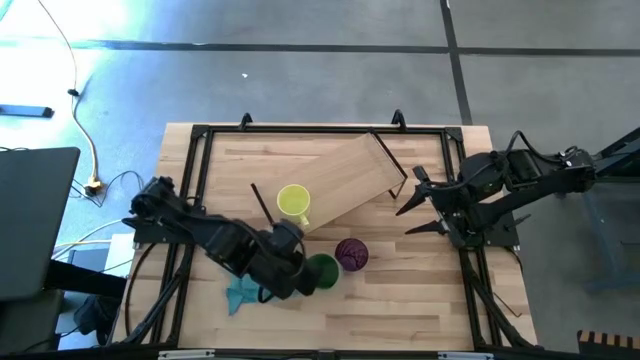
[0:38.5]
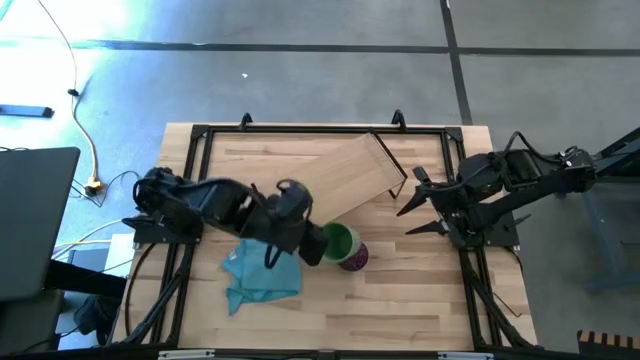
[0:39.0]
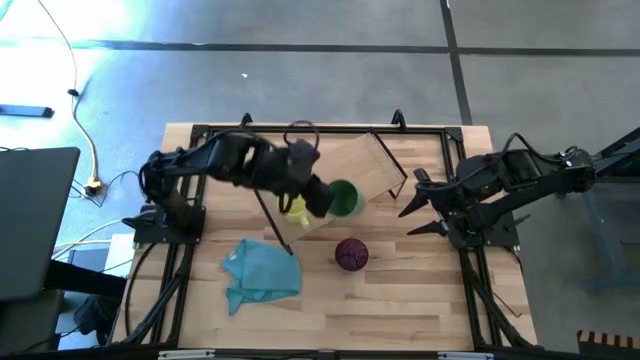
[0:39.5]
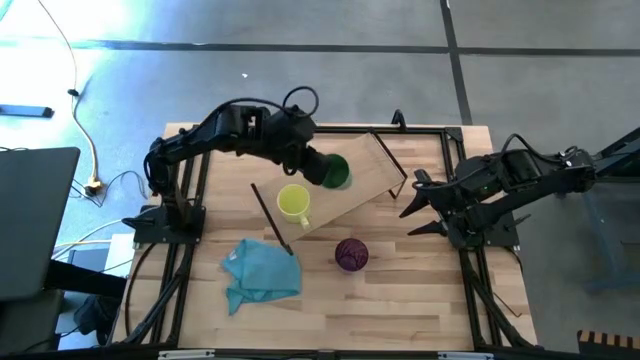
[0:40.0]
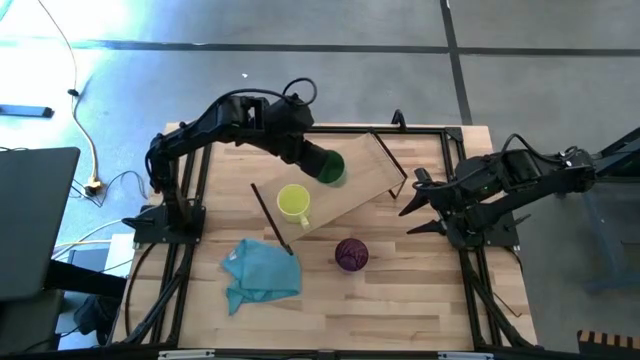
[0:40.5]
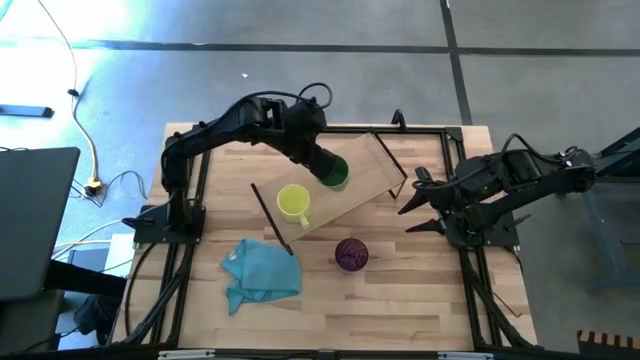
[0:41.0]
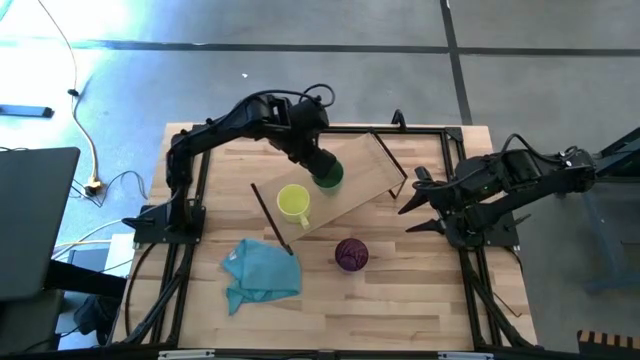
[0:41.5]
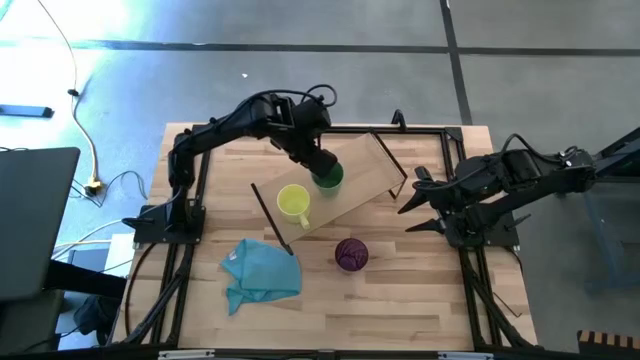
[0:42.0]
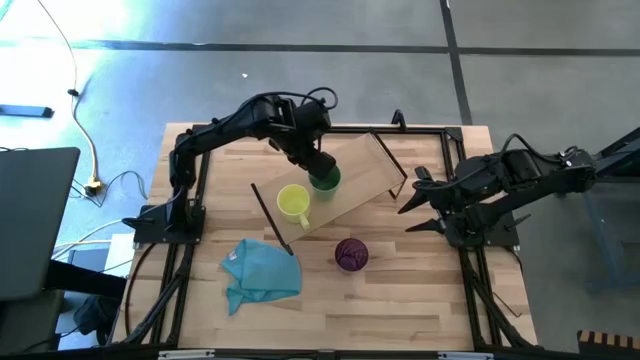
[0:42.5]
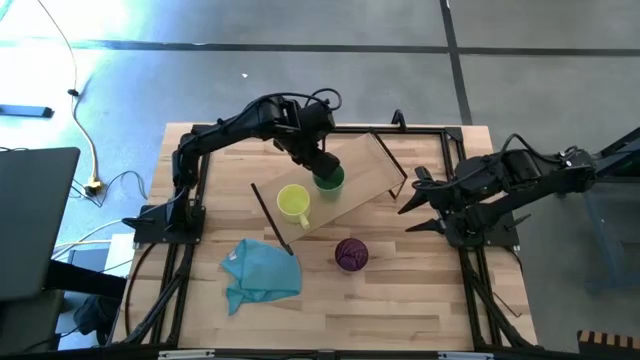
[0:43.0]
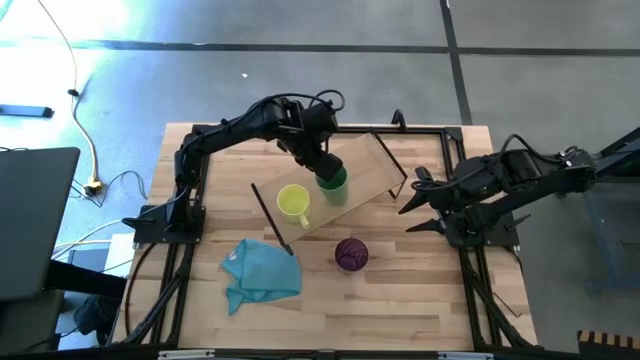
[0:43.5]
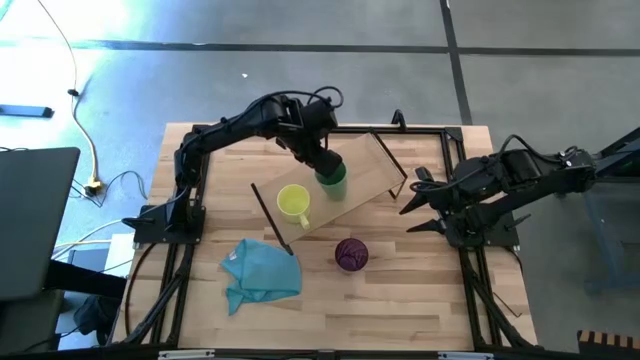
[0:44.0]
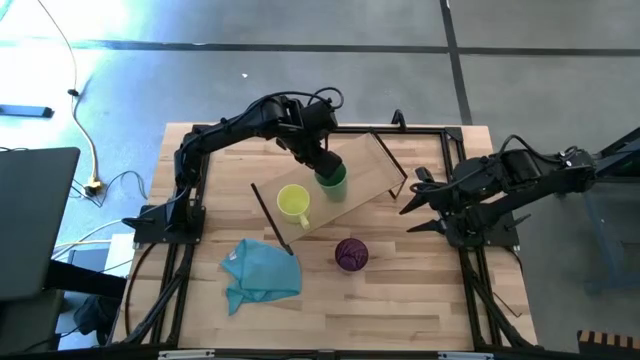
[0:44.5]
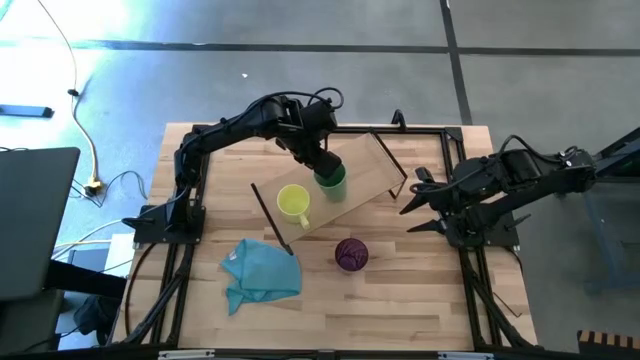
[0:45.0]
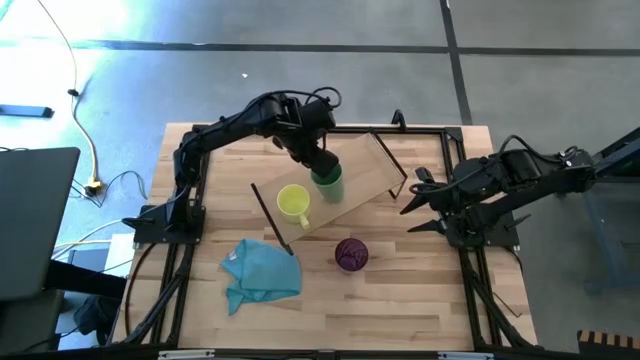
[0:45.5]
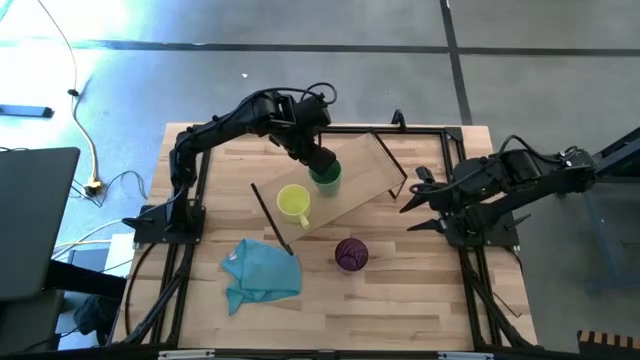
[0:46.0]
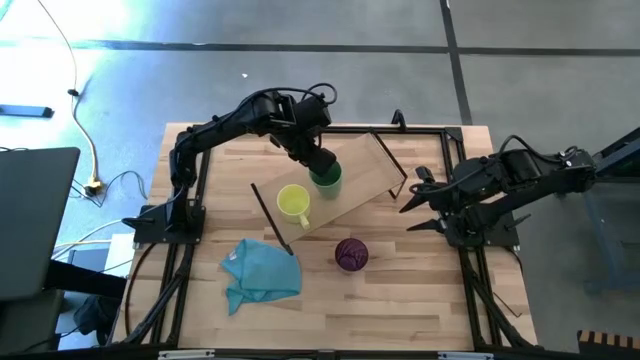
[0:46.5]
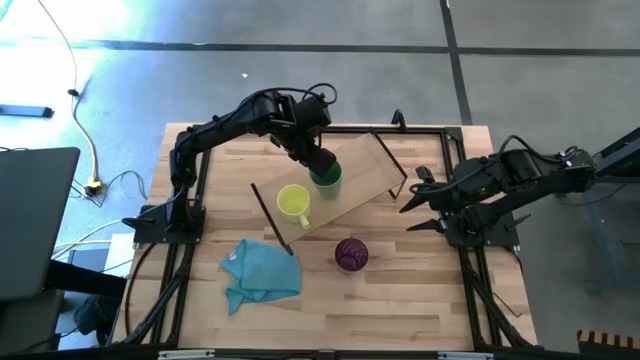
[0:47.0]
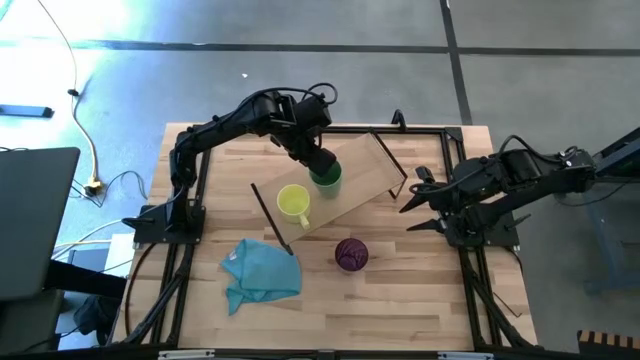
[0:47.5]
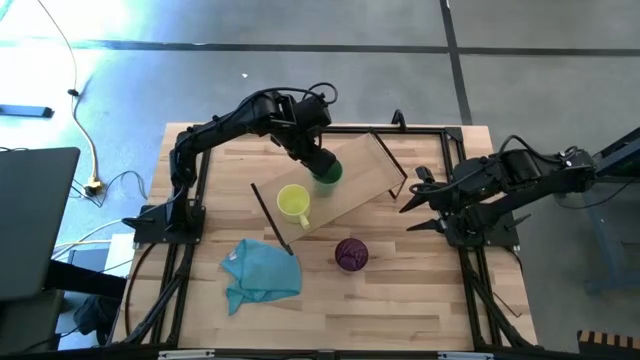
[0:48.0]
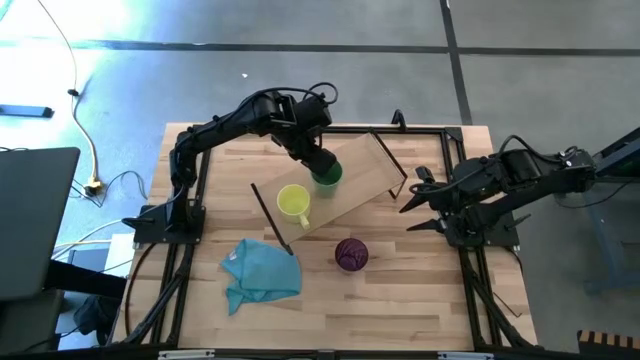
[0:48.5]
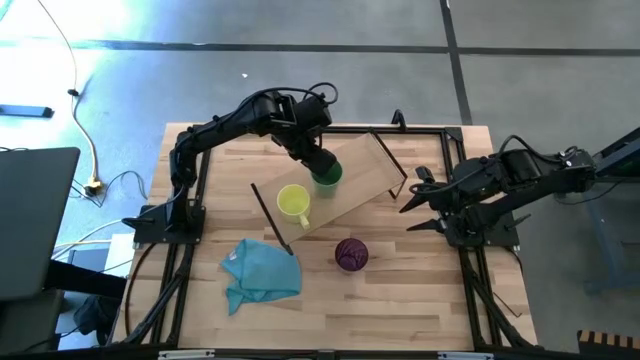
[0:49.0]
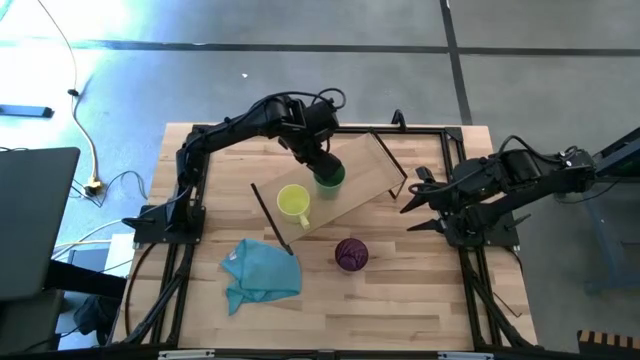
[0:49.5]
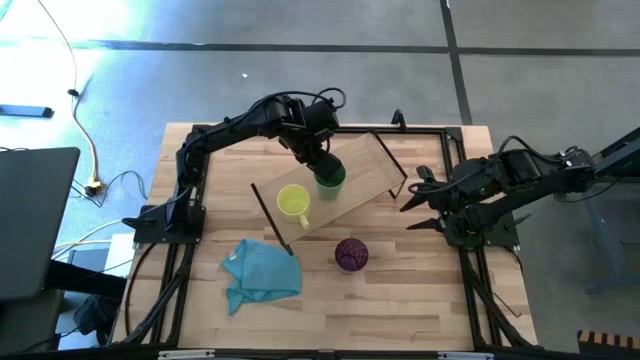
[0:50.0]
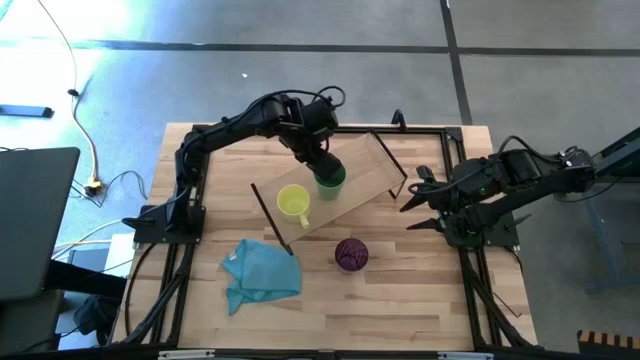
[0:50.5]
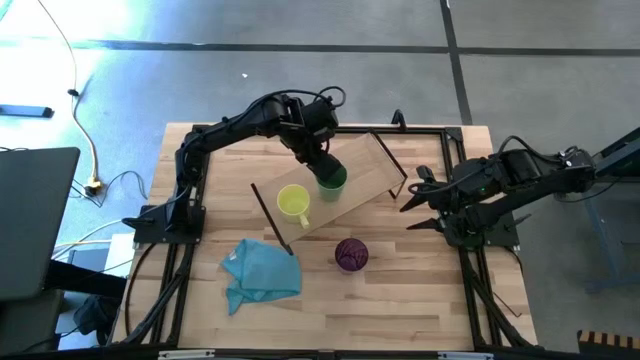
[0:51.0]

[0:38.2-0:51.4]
Task: Stack small to large cups/mugs on shelf
Put the green cup on the shelf

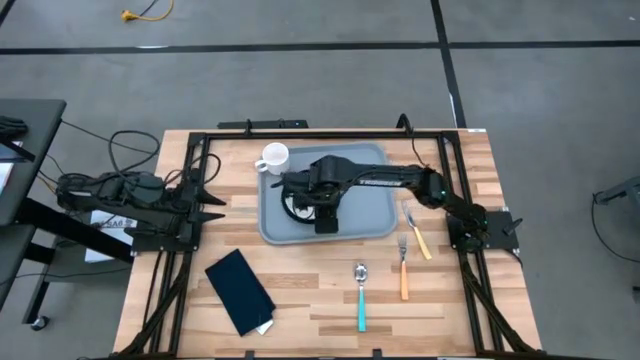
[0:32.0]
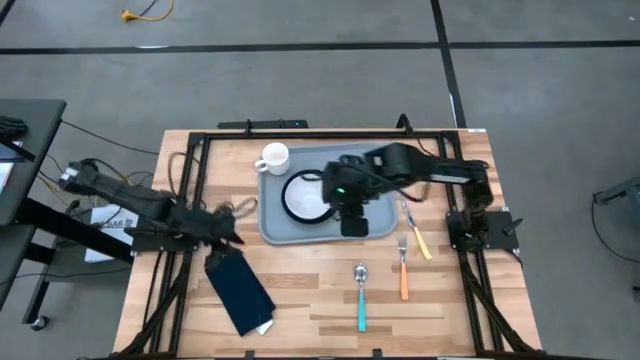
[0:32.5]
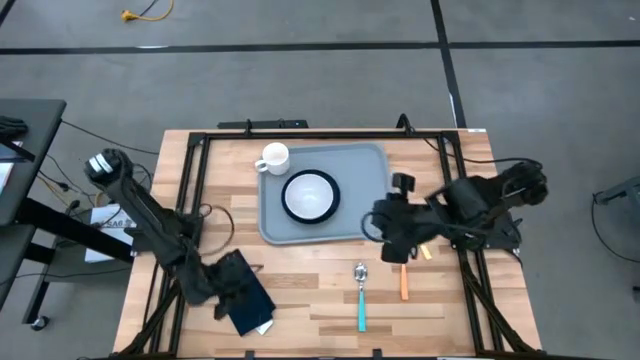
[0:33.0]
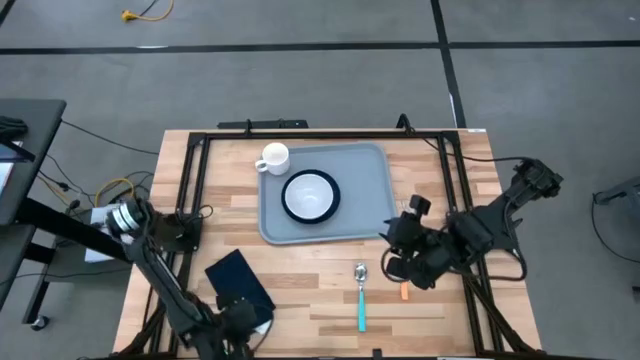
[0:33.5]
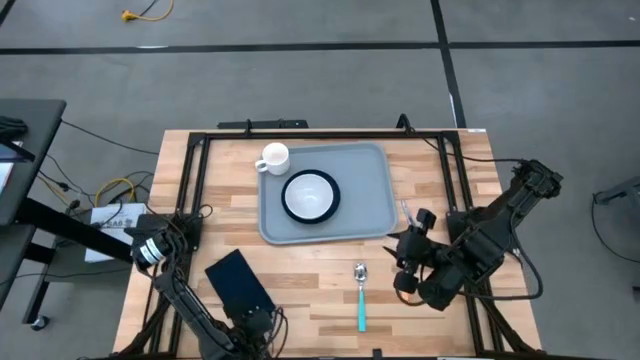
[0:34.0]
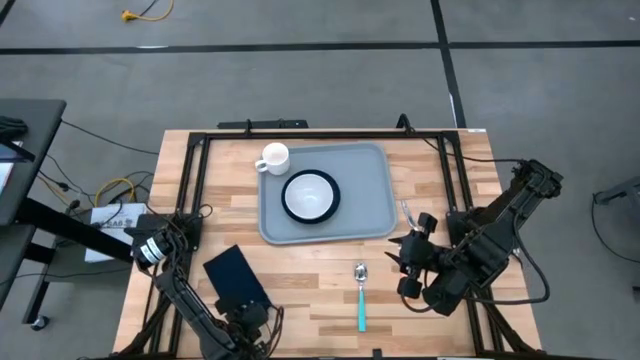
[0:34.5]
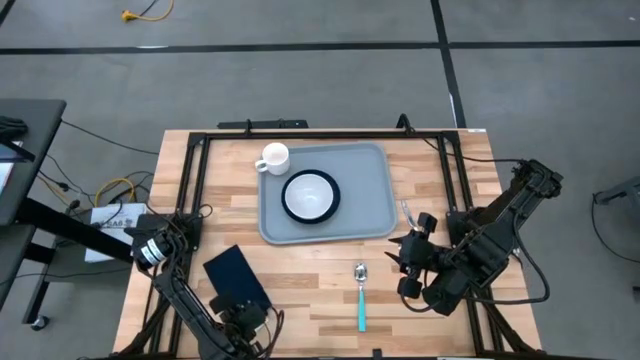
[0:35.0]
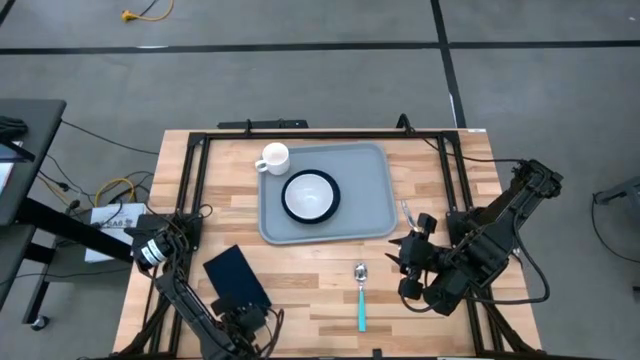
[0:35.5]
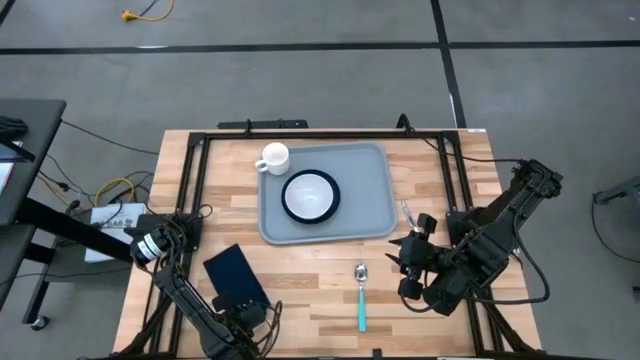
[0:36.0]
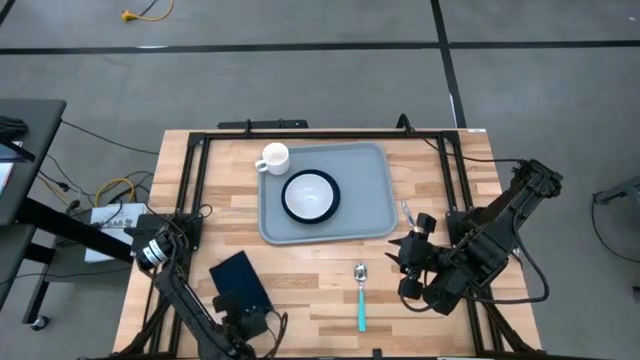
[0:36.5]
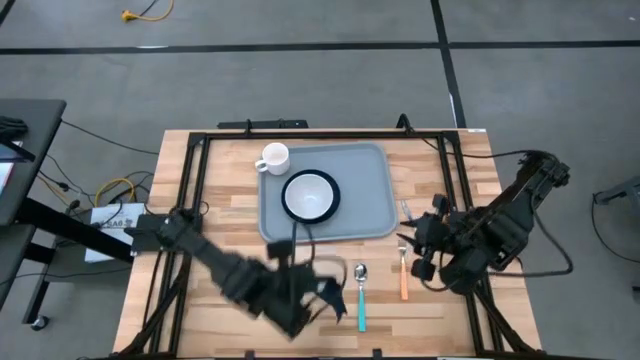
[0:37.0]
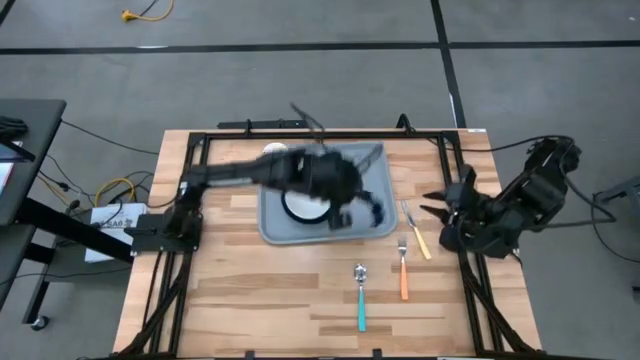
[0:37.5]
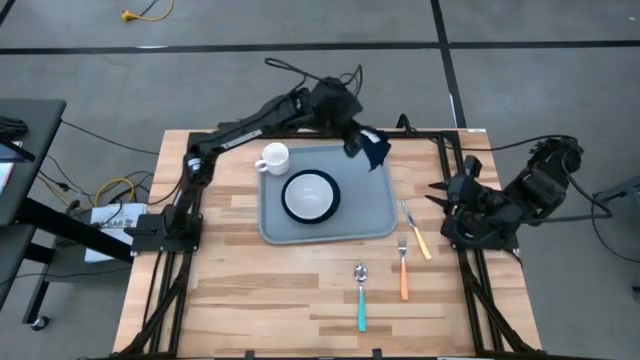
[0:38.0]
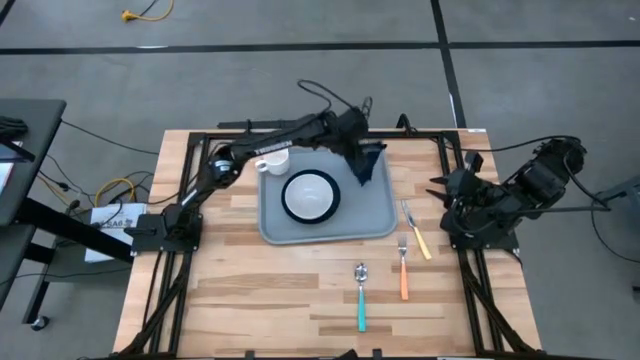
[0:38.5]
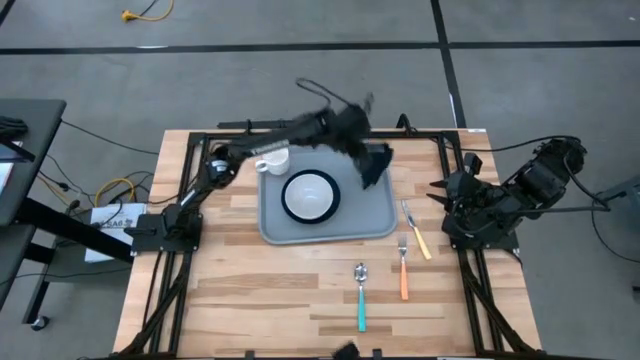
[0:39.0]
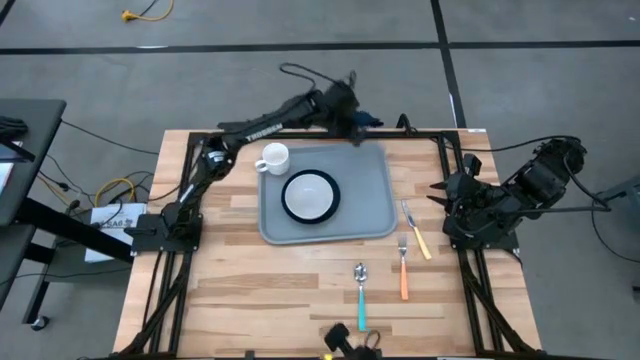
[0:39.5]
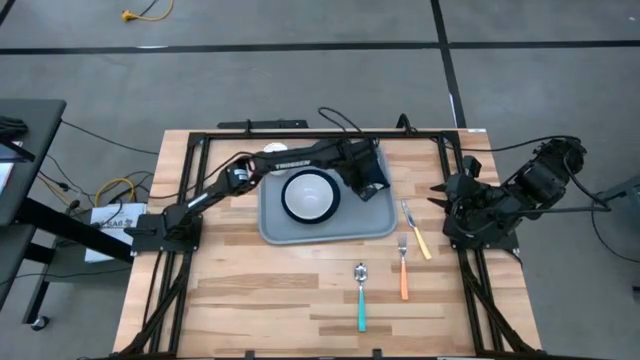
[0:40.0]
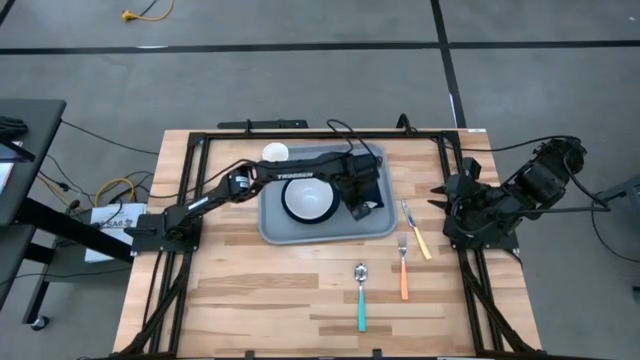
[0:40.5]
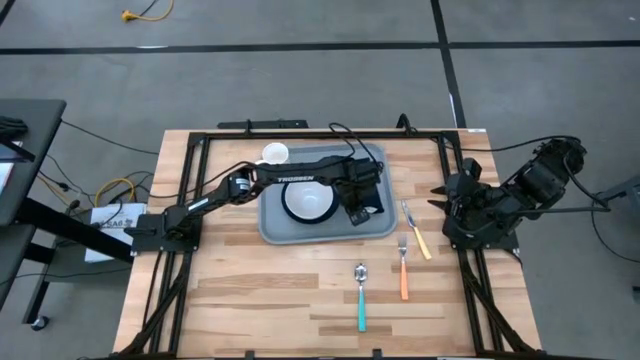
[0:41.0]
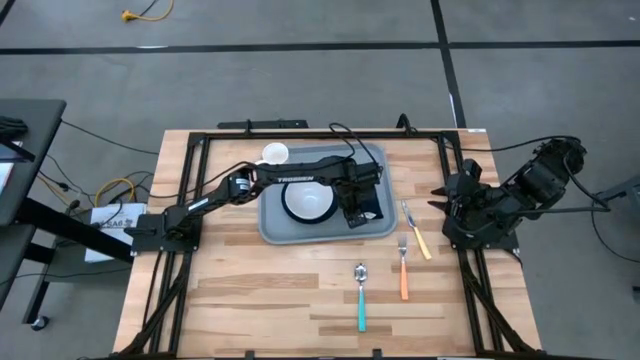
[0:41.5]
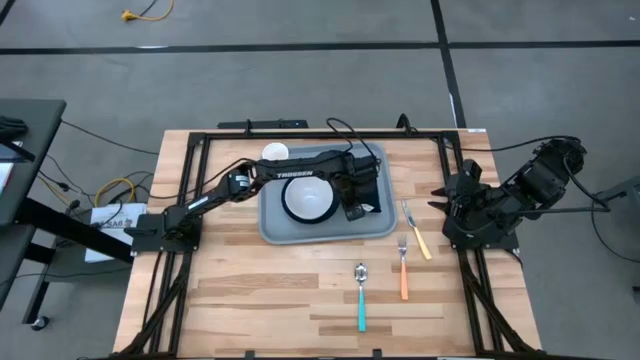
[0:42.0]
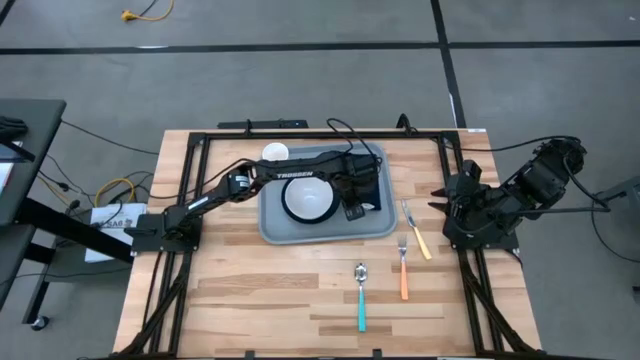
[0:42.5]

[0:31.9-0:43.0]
Task: Set up tray
Put the blue napkin on the gray serving tray to the right of the green plate
